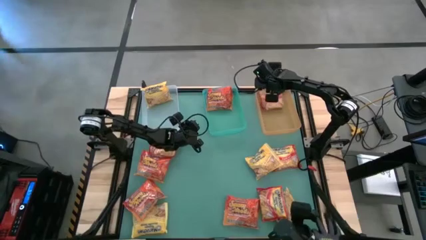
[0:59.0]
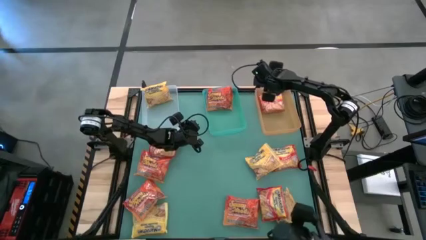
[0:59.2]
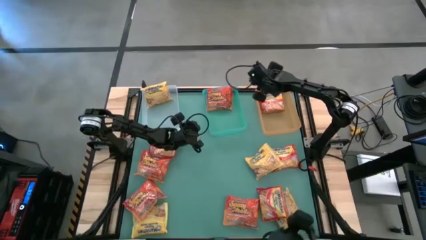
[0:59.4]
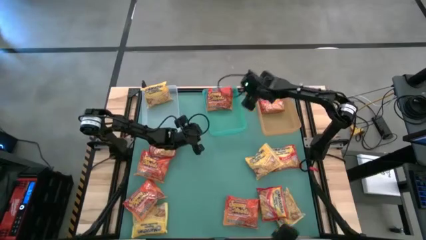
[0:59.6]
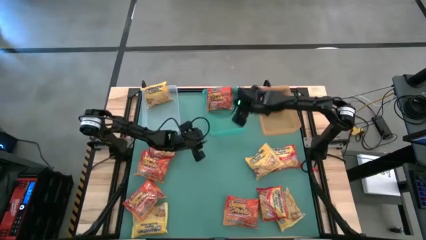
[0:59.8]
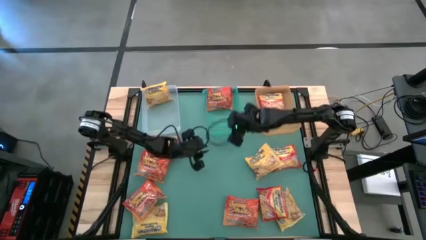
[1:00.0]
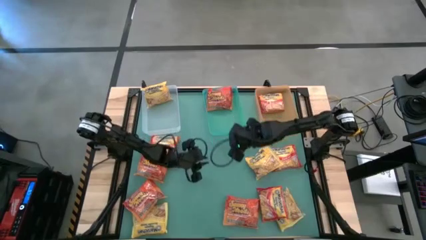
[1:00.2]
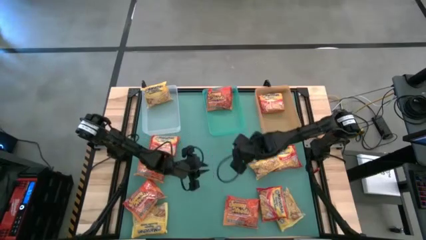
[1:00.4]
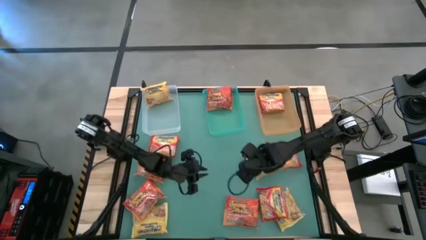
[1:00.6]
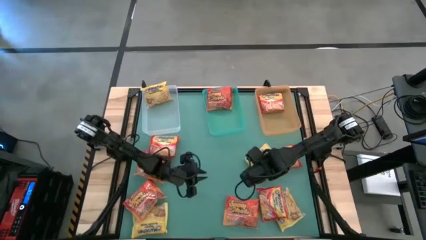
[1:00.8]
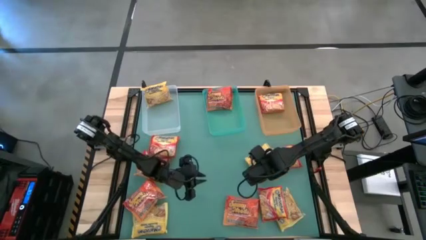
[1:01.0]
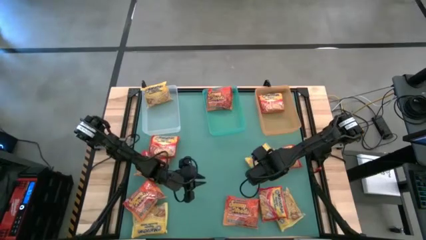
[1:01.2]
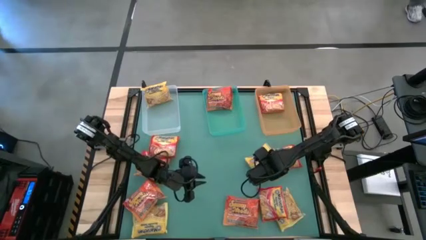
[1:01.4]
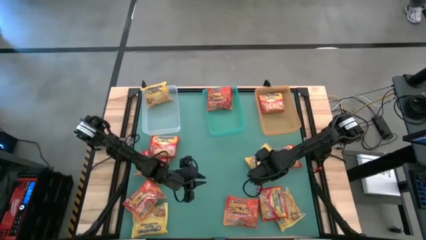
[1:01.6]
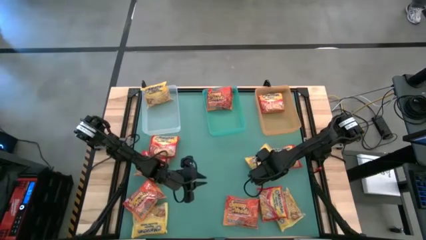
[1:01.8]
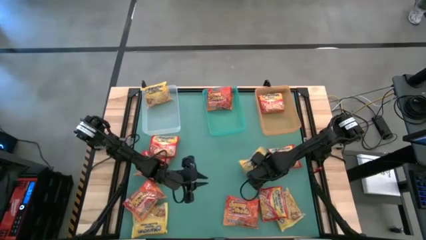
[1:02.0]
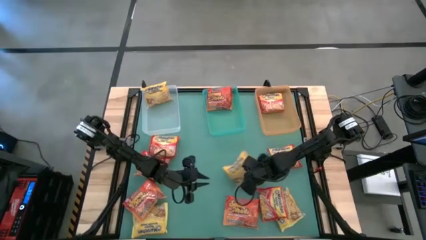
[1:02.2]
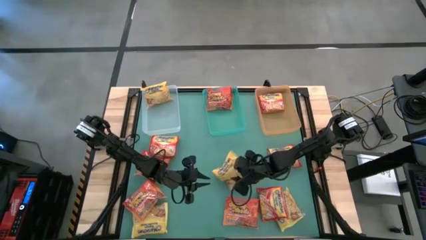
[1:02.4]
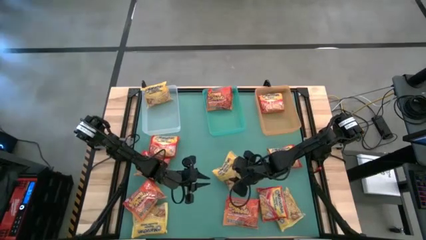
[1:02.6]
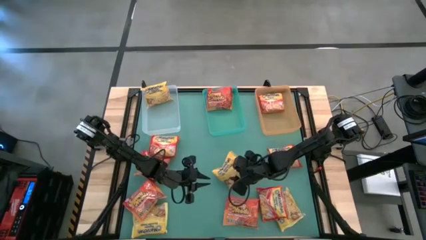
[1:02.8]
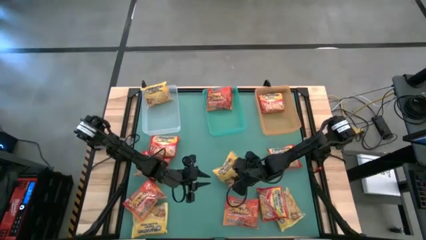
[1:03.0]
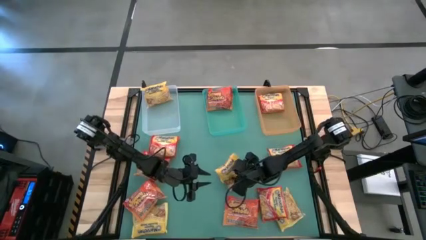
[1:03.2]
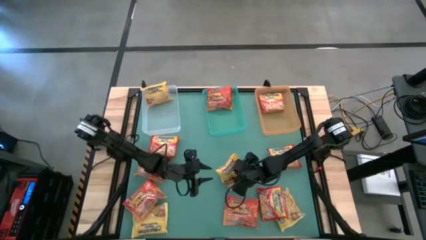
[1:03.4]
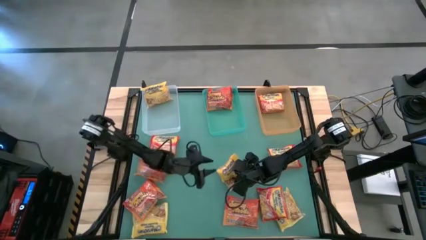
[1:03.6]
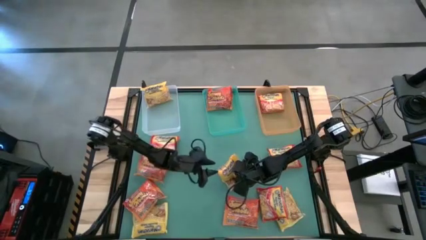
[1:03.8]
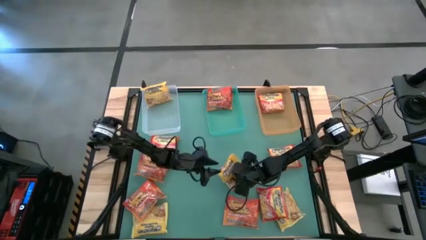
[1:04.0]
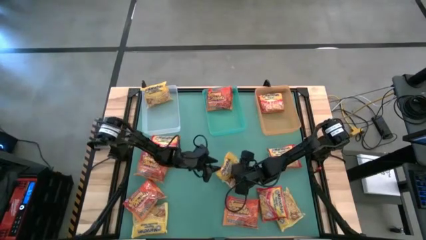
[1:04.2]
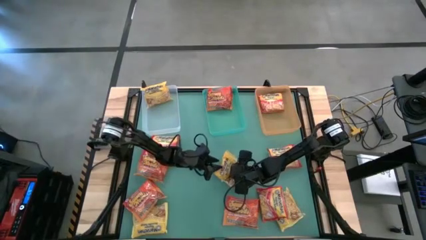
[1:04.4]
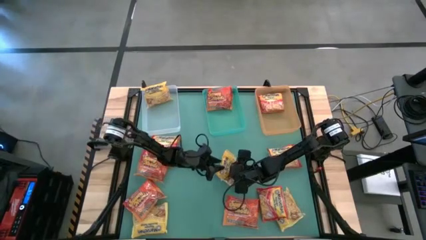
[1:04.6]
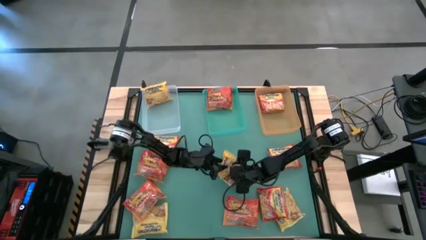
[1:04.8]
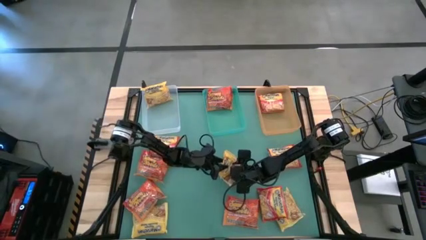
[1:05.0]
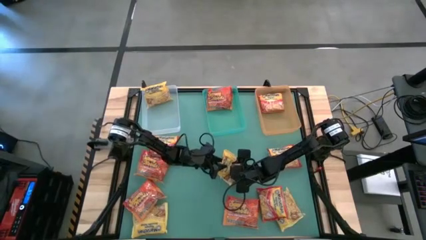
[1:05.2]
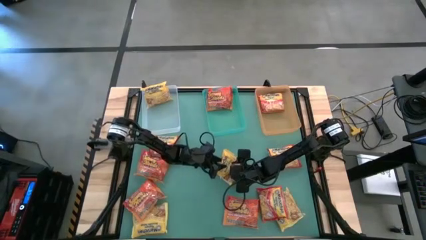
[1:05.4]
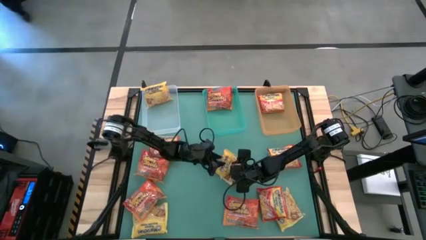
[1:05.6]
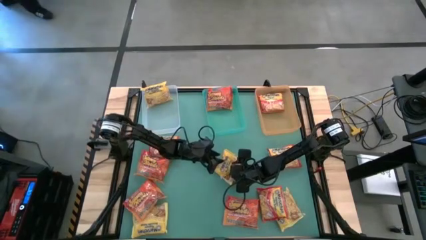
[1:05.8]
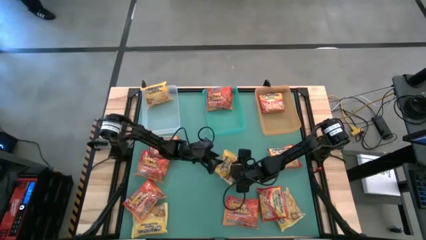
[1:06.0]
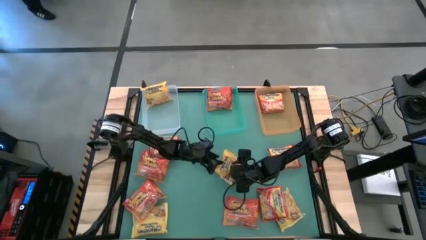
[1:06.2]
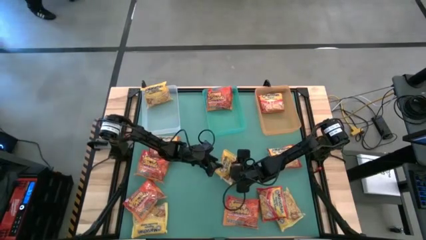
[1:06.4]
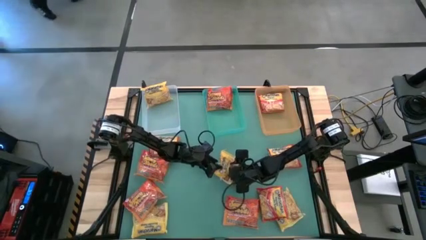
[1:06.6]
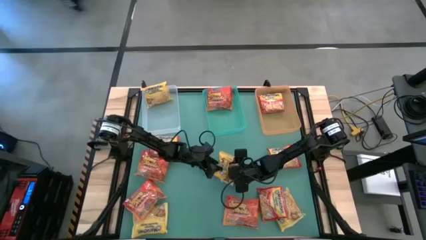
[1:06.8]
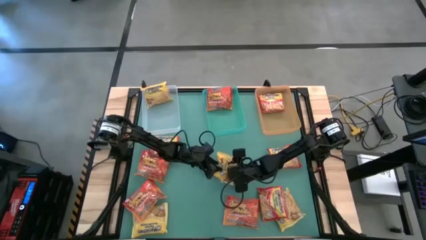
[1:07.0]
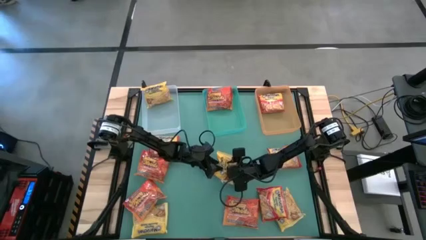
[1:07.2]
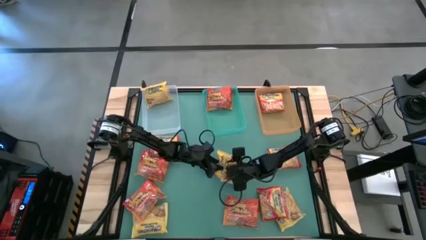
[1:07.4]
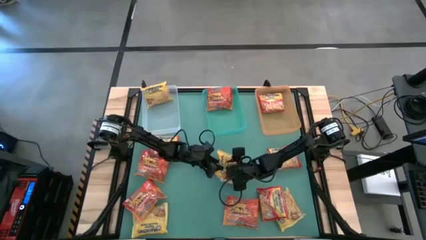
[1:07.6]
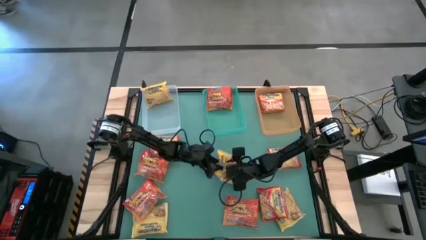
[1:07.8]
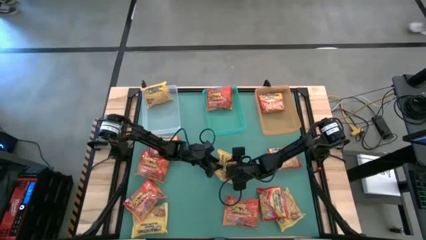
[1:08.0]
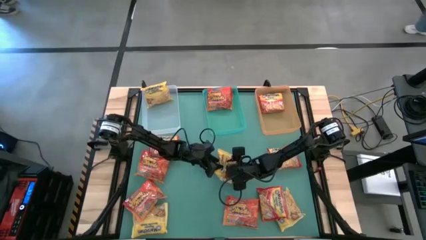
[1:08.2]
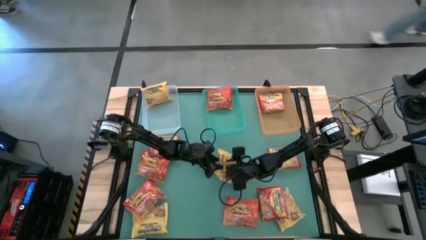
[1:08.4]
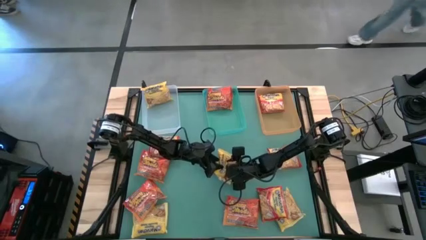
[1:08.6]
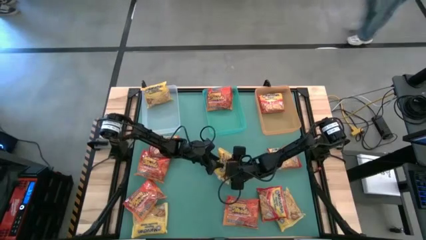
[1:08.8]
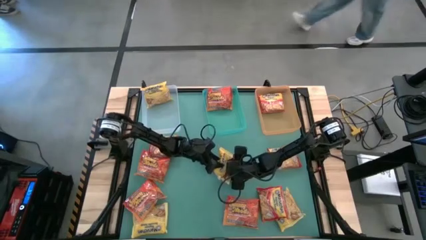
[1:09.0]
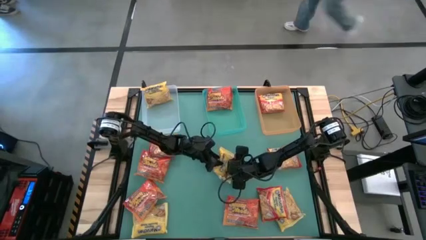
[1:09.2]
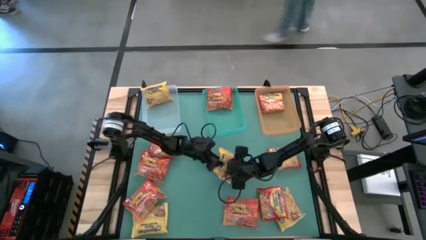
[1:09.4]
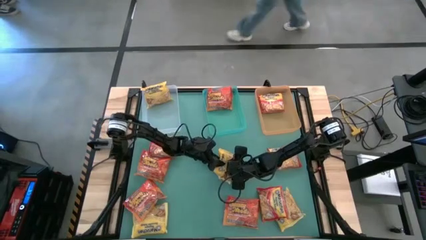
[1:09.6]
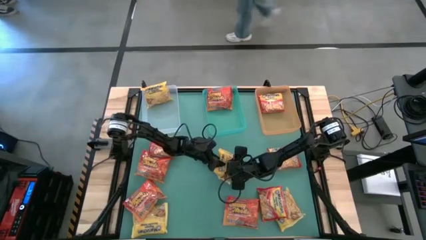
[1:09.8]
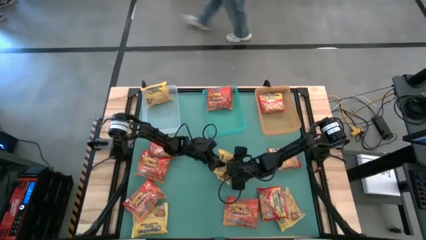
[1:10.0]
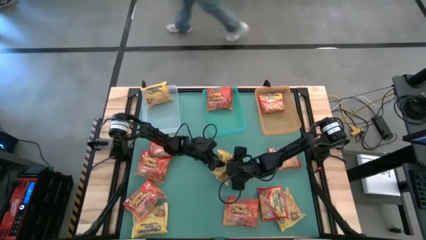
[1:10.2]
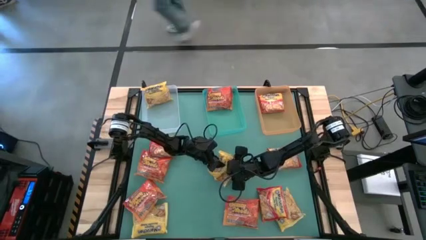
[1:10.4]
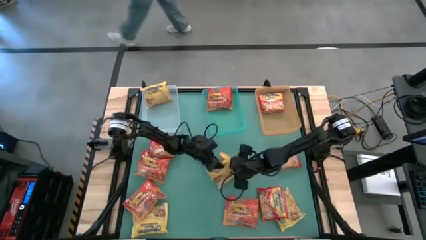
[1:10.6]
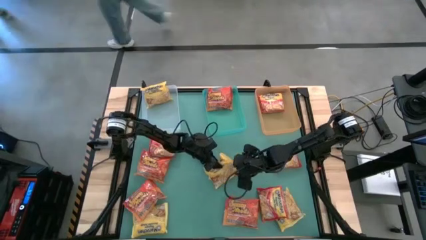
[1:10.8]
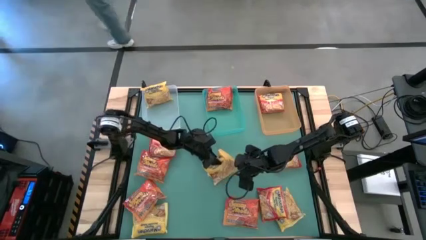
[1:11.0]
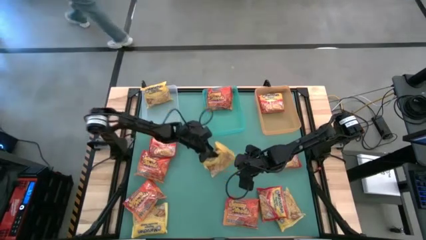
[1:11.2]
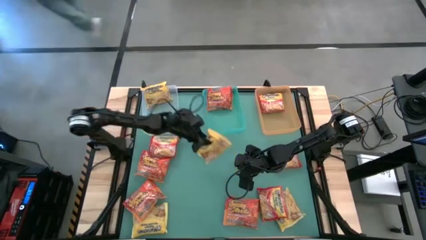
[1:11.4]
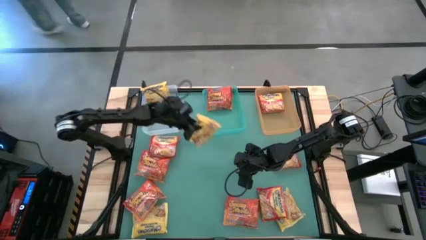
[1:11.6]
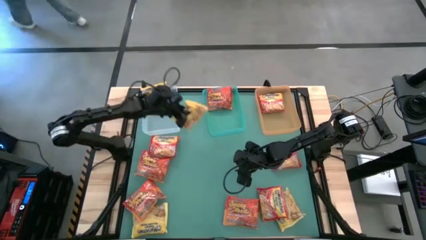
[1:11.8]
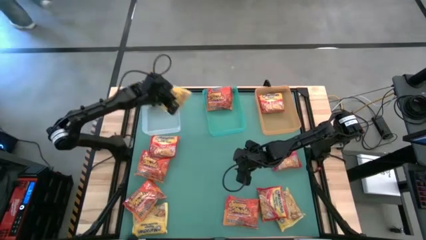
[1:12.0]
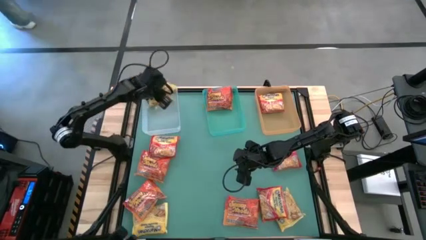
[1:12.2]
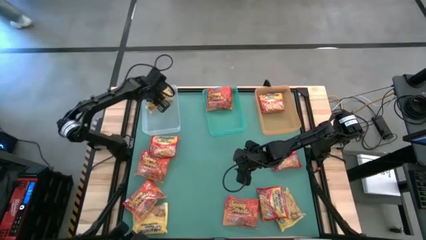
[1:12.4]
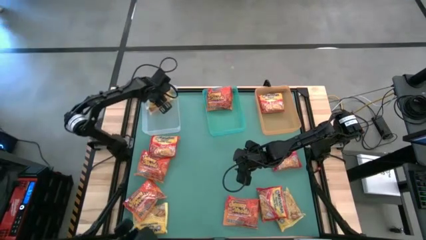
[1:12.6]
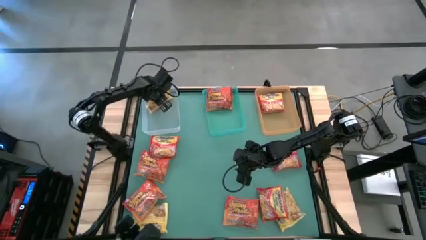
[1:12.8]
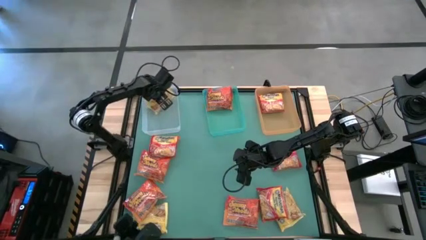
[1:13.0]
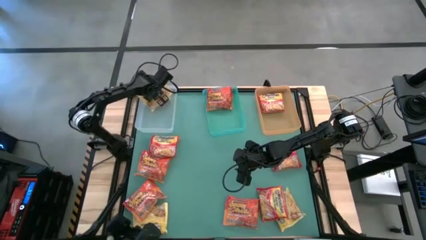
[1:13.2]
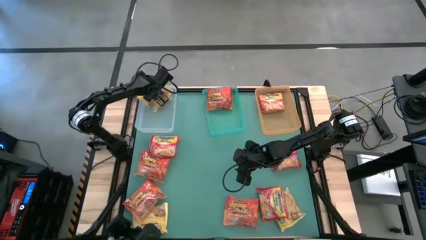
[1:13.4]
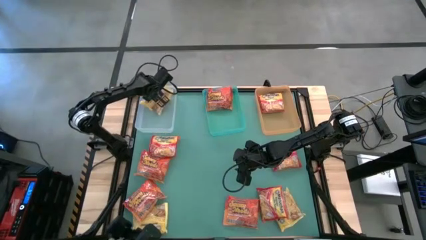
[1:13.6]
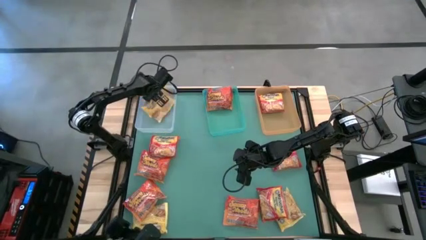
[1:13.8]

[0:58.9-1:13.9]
Task: Sort Maruchan noodles
Put the yellow noodle pack into the transparent bin

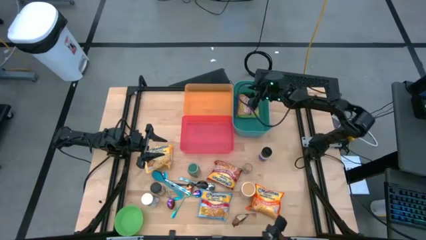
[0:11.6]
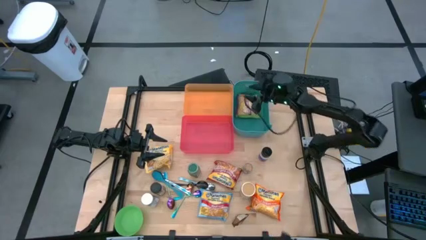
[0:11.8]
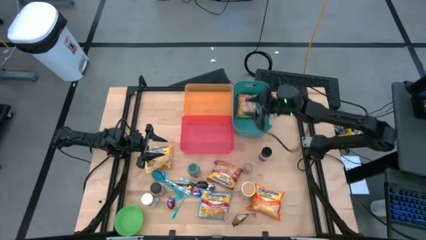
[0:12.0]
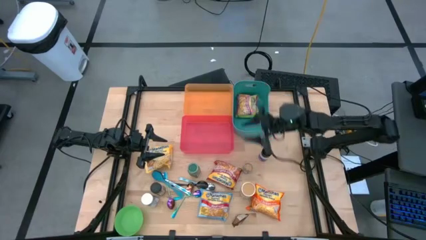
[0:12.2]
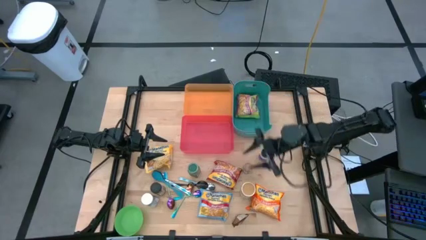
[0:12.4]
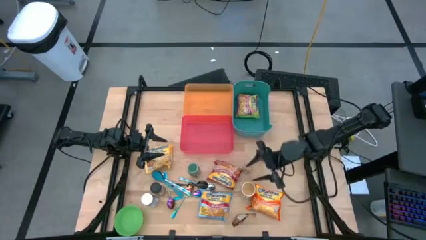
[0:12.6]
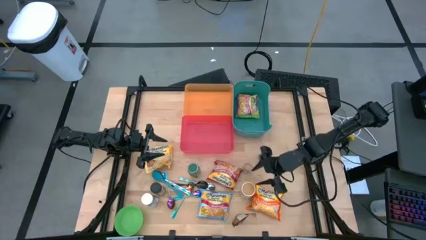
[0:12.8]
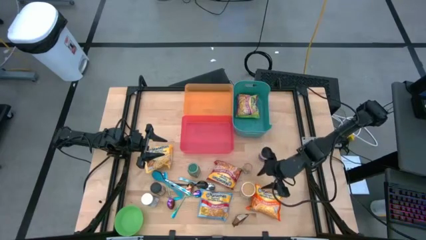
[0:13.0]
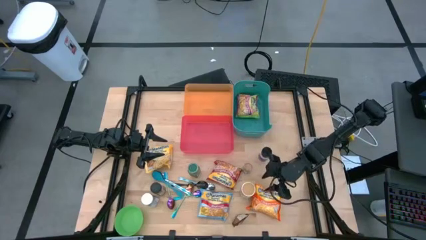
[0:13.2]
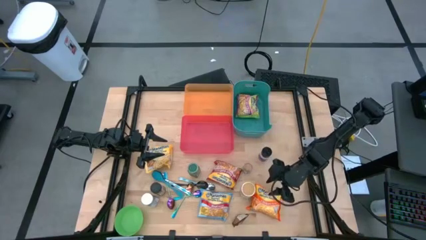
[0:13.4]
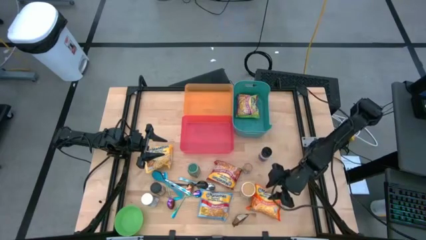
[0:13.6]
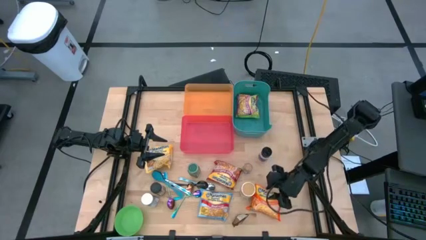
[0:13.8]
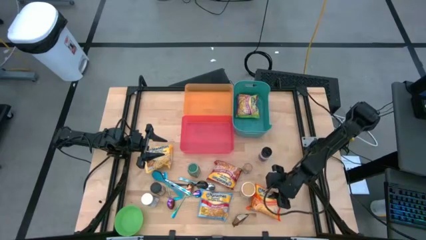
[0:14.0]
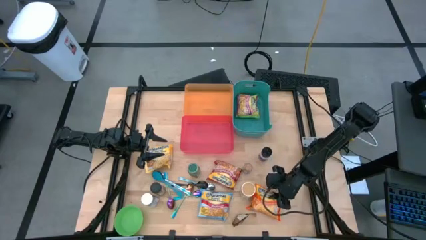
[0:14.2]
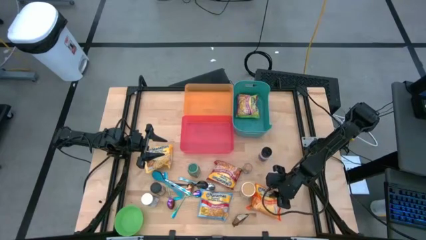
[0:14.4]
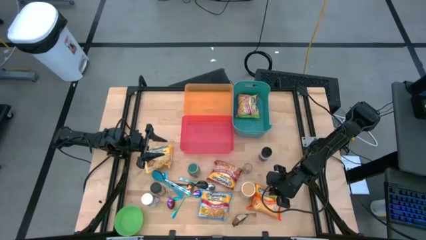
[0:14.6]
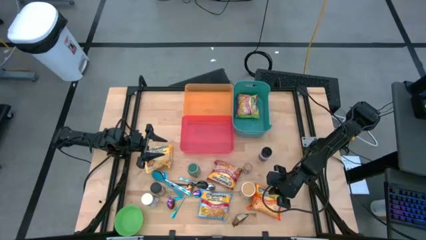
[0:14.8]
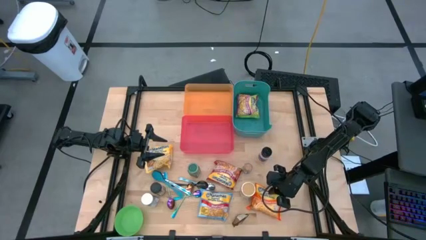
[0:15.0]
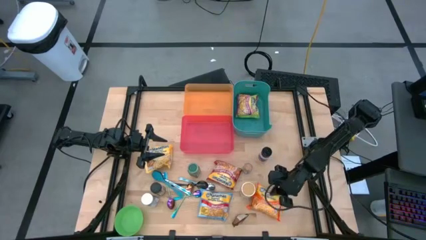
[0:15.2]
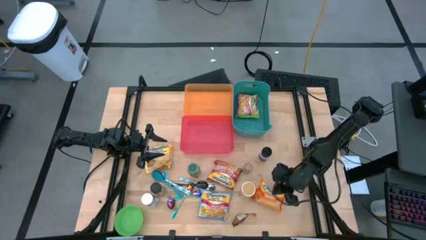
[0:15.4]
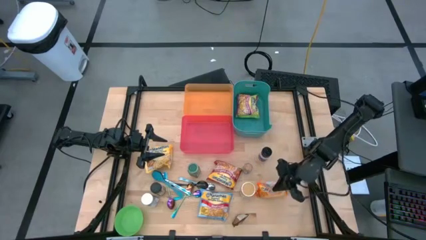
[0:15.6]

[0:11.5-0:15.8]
Task: Pick & Place Food Item
Put the orange noodle pack into the blue bin
